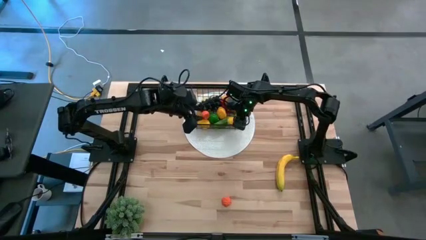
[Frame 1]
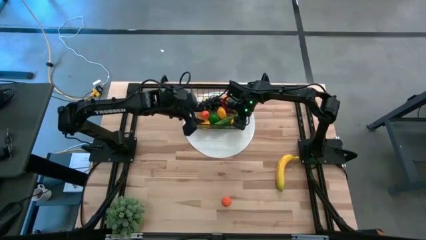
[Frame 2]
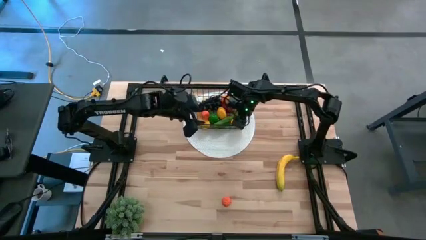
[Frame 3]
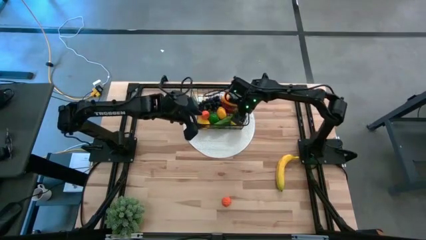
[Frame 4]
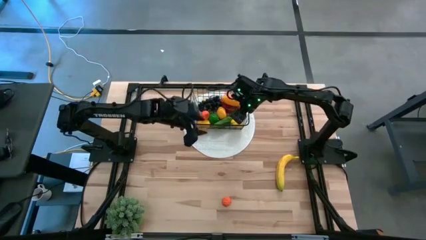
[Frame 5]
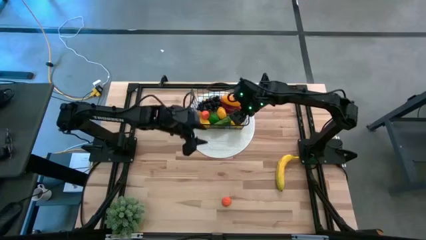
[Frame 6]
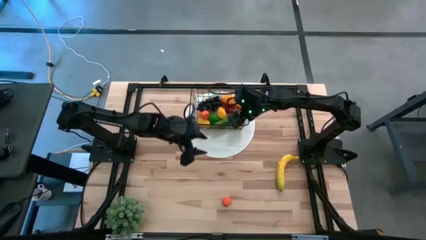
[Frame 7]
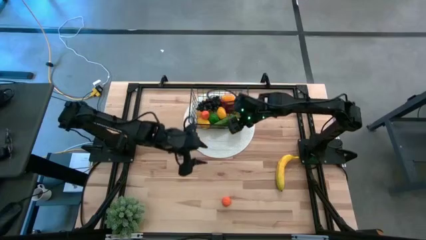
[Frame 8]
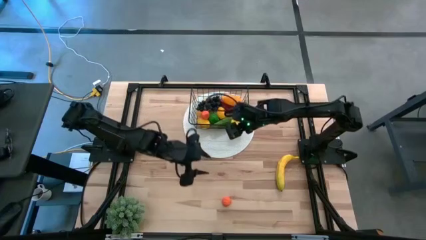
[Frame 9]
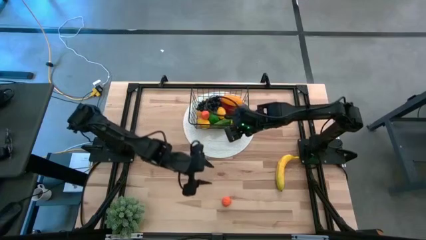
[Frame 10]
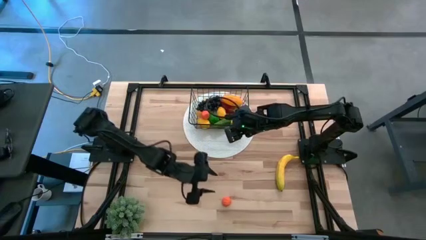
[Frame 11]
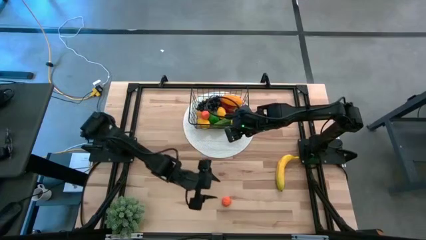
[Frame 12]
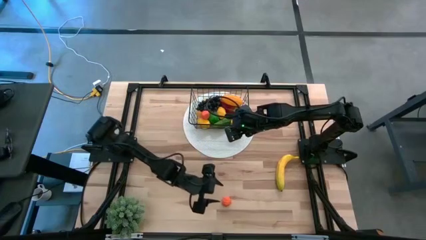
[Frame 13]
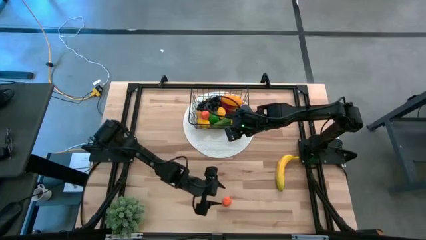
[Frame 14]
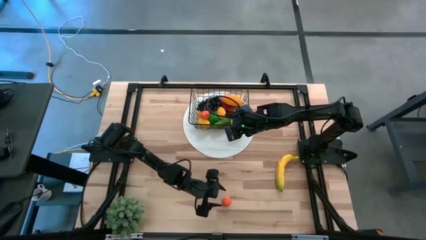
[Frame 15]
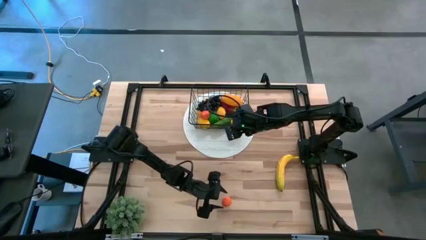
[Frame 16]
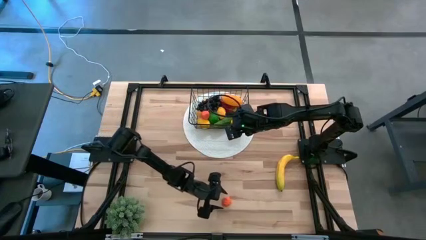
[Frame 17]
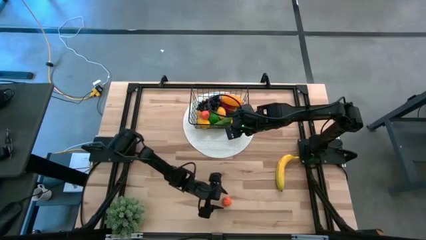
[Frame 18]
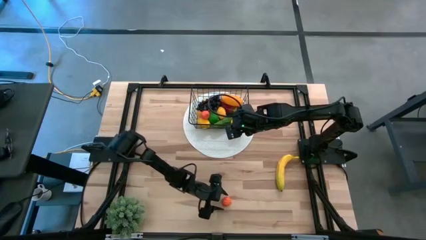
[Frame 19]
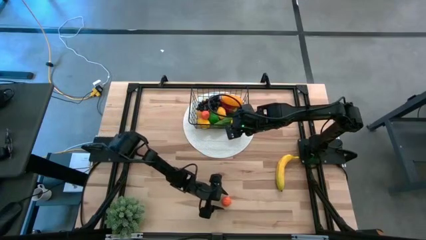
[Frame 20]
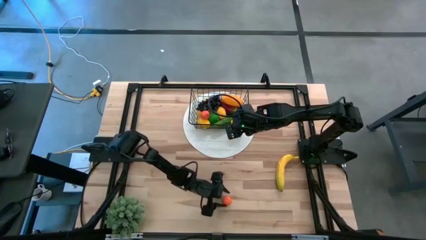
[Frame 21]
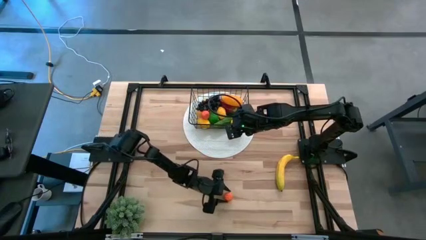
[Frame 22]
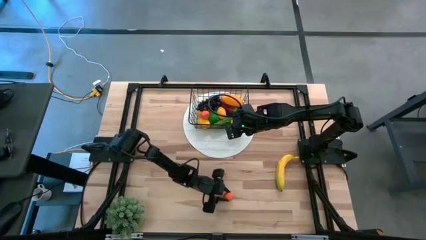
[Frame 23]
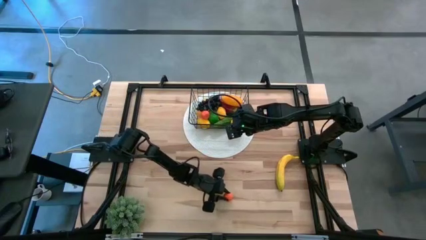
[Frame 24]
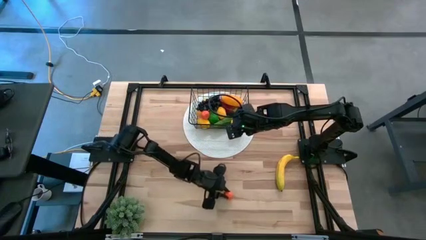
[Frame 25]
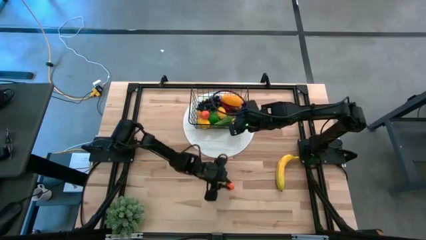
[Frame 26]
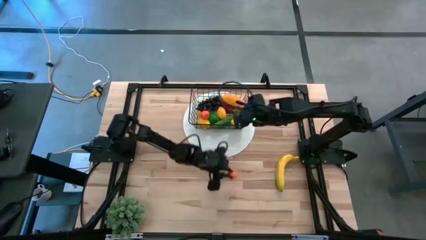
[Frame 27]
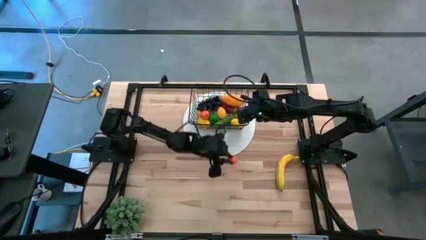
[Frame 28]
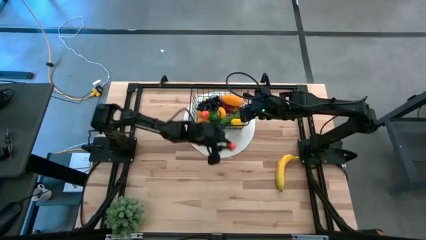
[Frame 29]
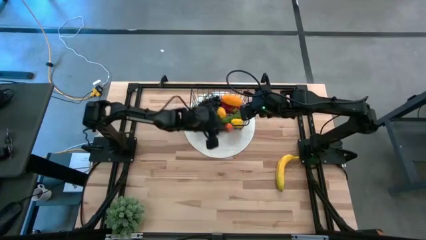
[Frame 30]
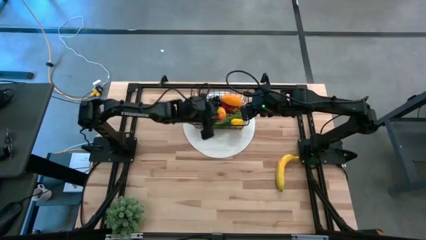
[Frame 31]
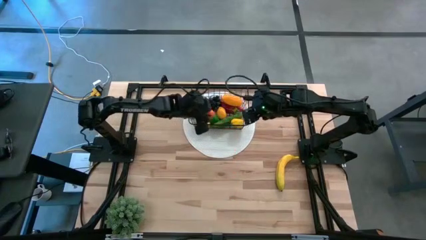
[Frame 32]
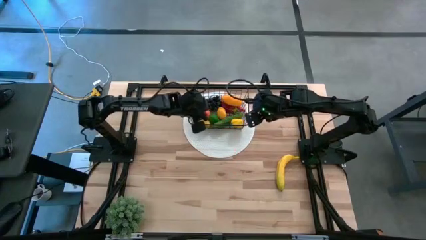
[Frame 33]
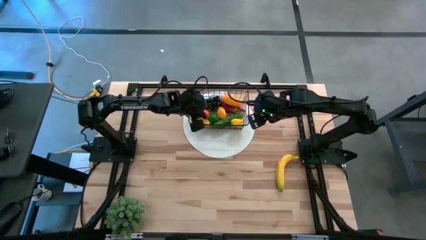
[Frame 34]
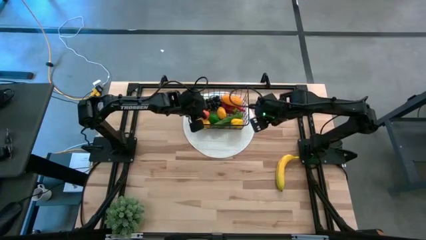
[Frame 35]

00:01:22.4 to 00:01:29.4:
Task: Build produce basket
Put the orange fruit into the black basket

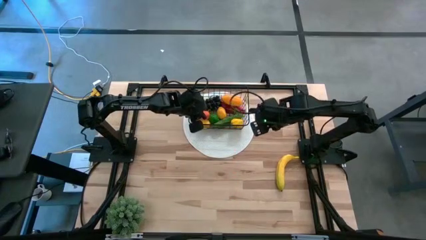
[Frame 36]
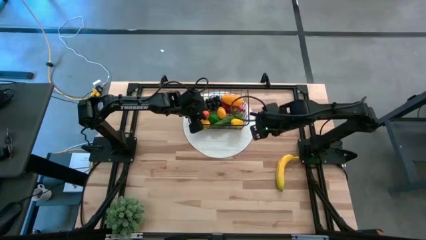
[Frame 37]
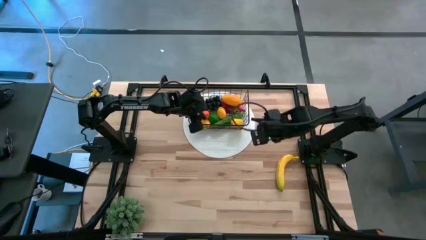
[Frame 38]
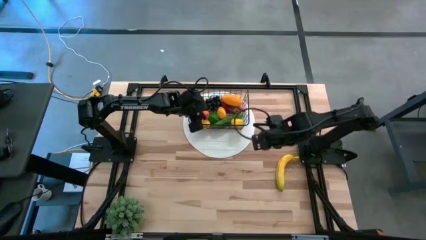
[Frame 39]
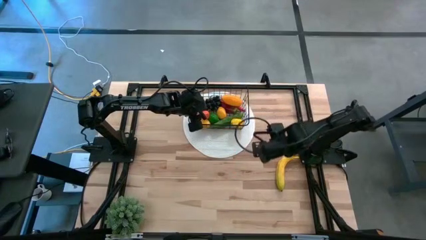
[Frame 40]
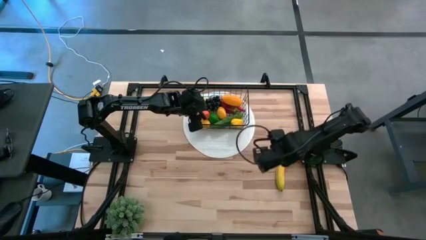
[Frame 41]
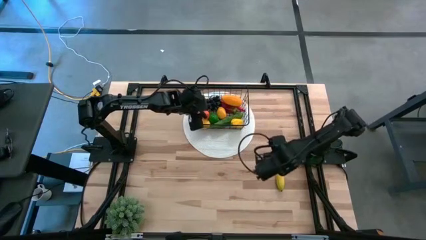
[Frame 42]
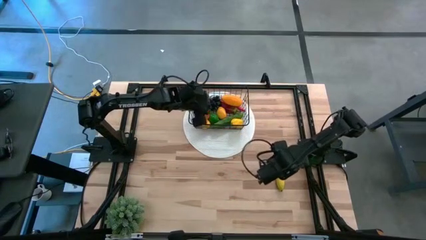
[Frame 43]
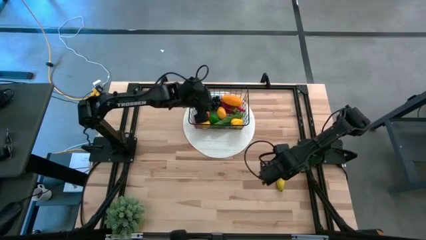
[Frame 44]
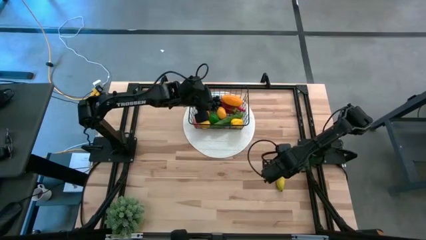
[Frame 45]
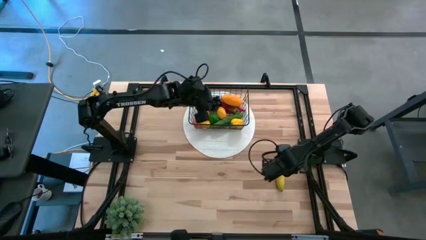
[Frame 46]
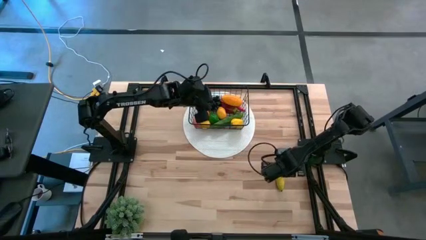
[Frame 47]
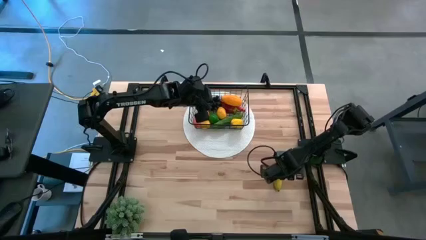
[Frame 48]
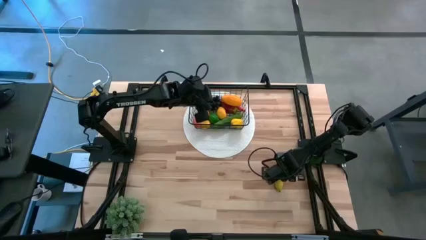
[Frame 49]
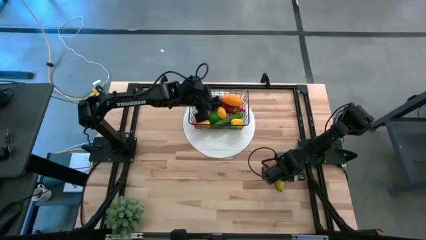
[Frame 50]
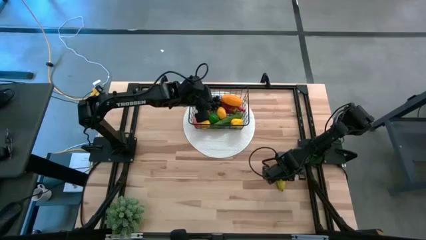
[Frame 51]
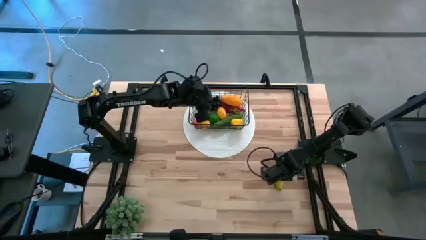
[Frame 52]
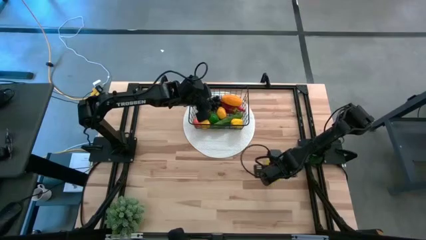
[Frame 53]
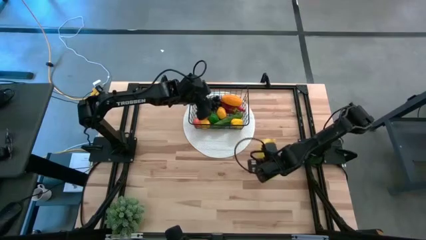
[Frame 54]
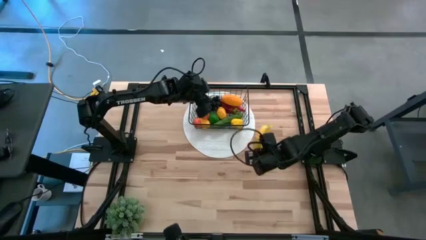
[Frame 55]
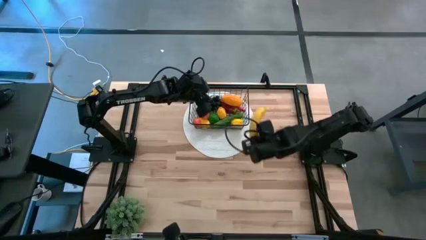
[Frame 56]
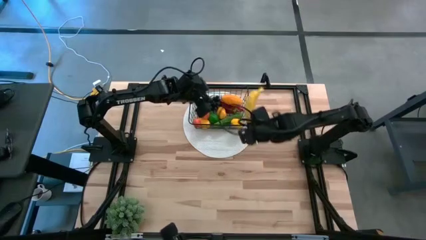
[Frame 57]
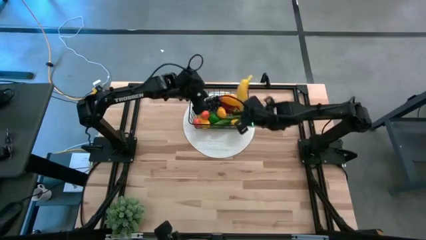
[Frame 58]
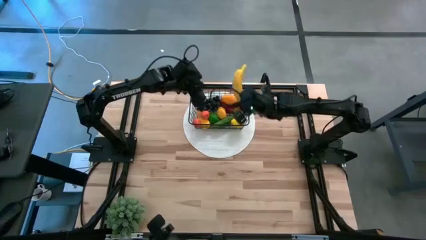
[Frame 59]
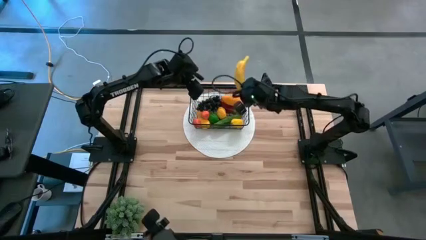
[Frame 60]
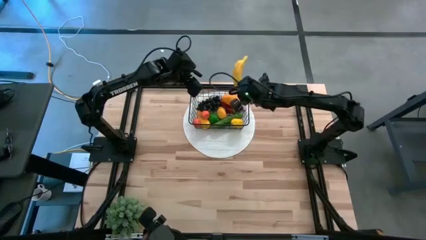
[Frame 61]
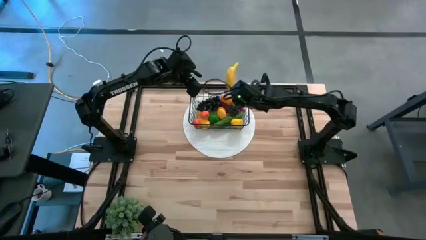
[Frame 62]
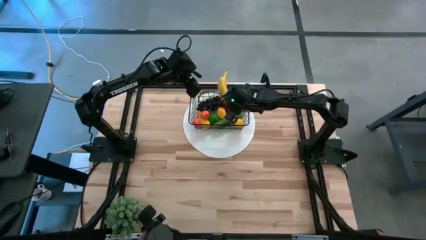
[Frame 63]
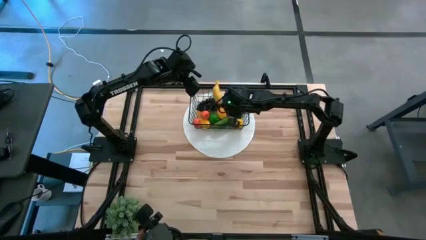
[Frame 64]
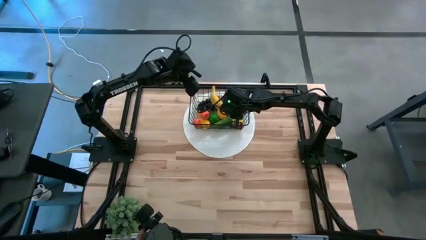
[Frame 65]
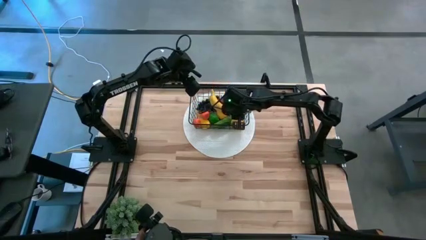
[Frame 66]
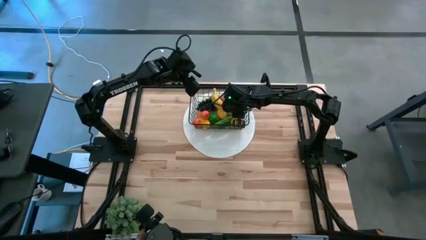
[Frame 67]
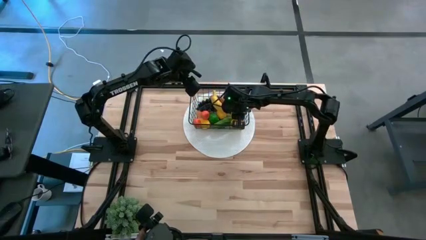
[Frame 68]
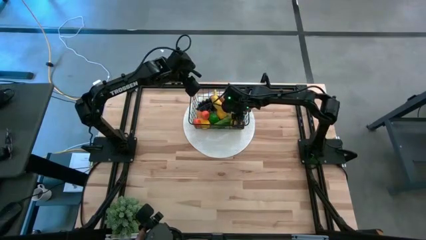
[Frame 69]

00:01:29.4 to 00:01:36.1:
Put the banana into the black basket

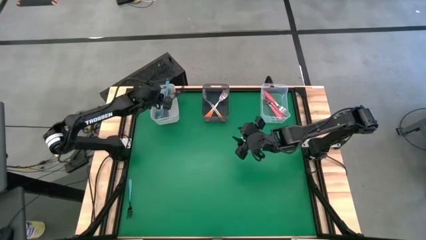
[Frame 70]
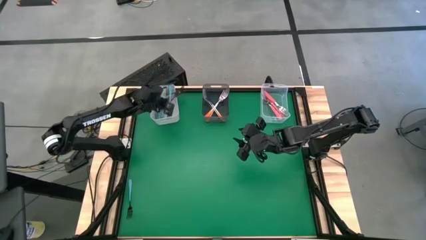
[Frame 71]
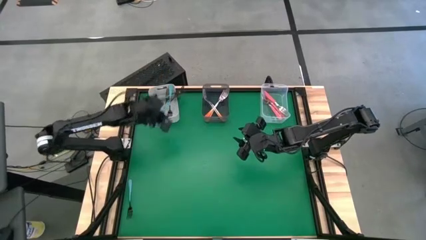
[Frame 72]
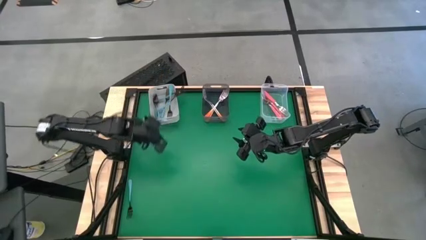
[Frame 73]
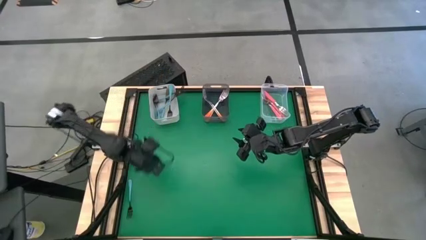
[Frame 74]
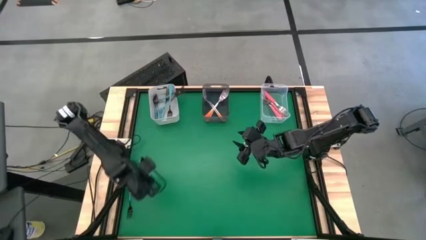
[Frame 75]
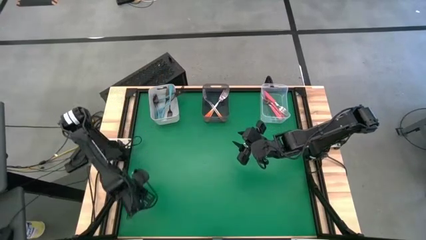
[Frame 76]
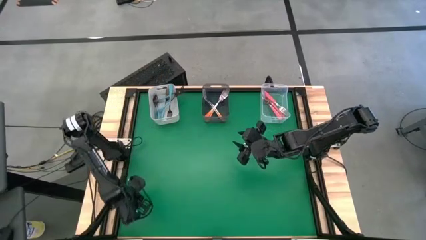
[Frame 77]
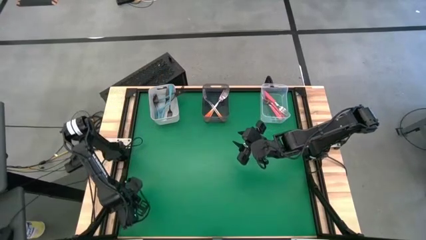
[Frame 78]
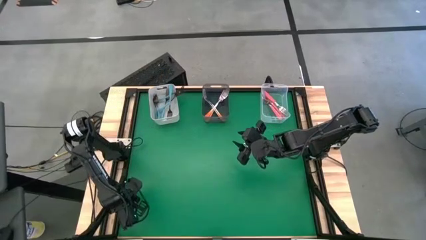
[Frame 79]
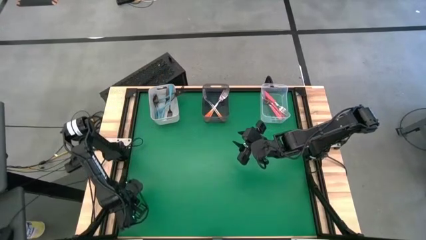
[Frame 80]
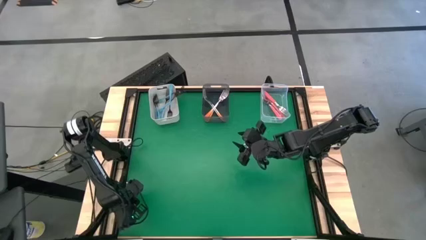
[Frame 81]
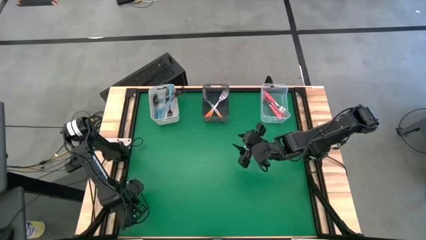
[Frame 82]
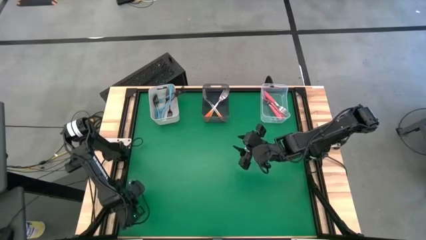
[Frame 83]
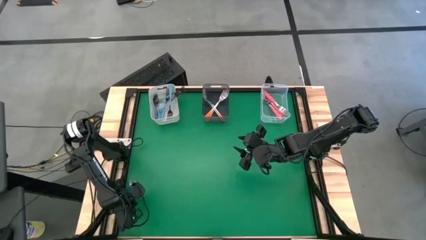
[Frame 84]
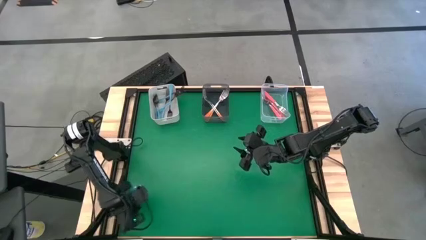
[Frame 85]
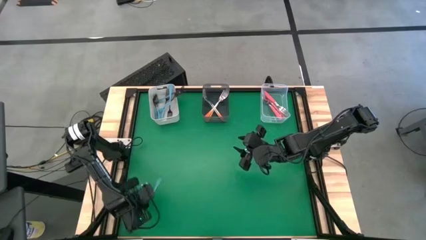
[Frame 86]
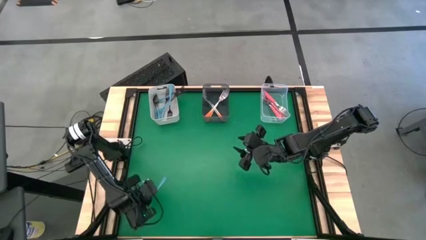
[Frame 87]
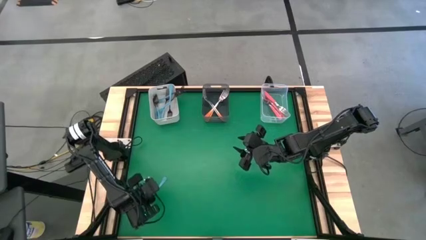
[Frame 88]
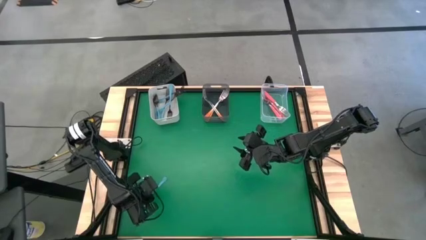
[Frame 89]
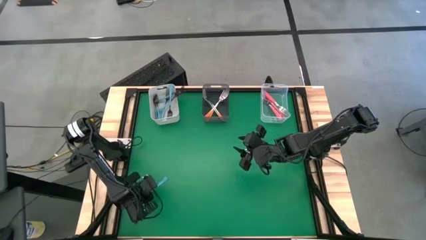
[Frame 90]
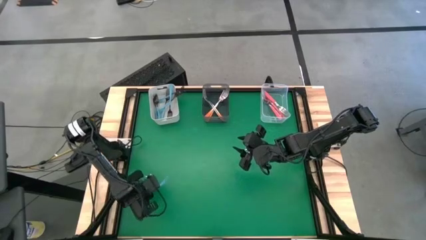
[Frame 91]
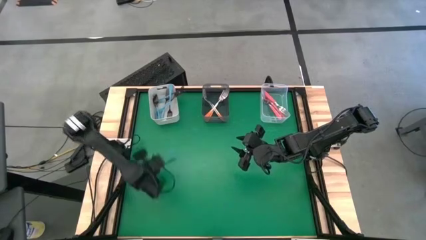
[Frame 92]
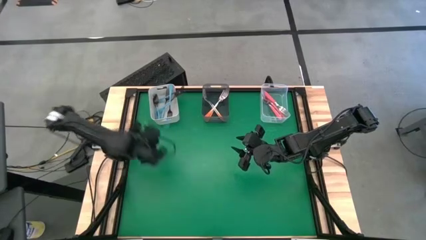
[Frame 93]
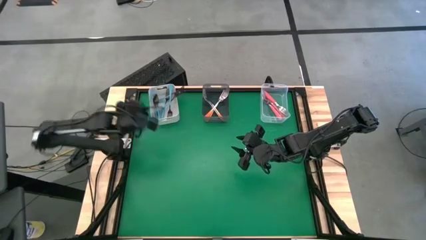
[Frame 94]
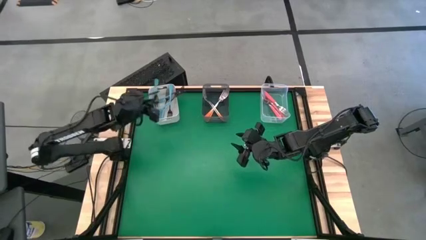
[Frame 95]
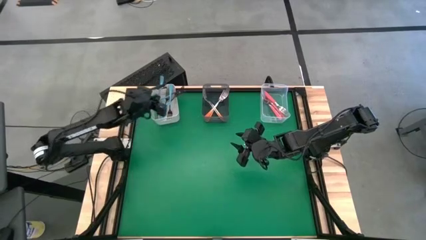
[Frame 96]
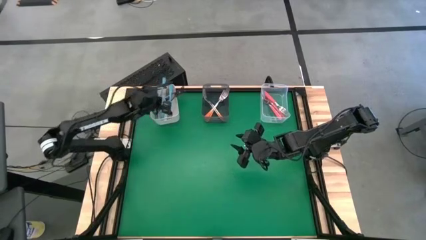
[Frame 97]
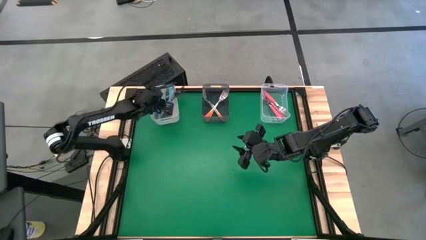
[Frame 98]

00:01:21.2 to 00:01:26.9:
Task: Sort silverware by color (type)
Put the blue fork into the white bin
